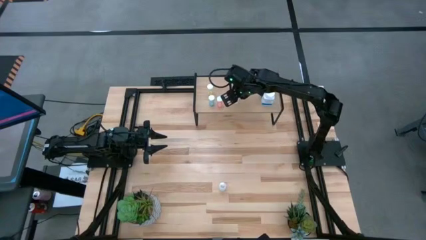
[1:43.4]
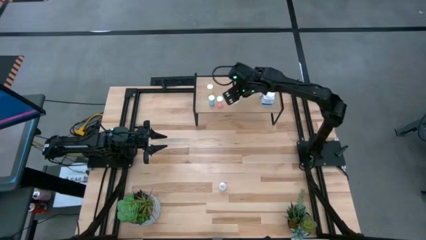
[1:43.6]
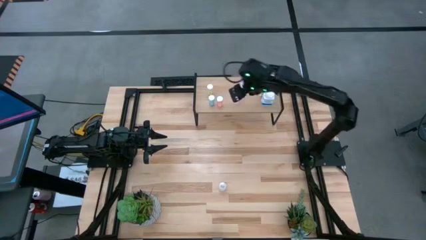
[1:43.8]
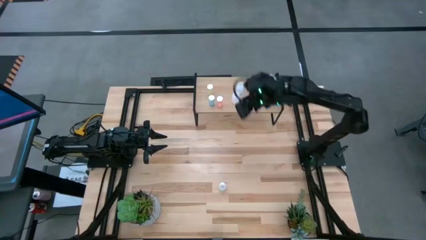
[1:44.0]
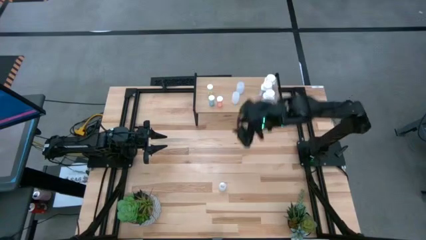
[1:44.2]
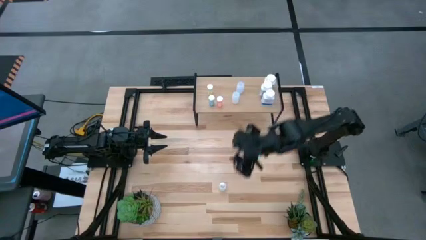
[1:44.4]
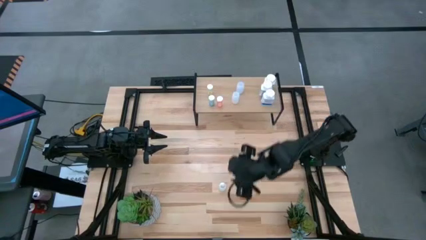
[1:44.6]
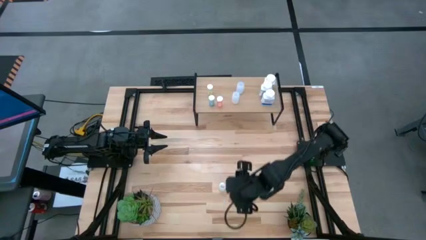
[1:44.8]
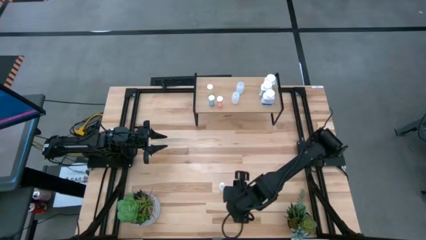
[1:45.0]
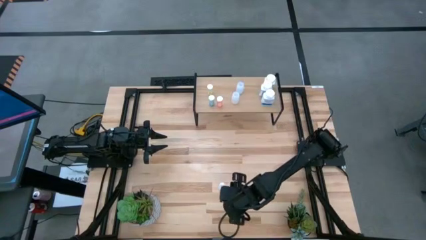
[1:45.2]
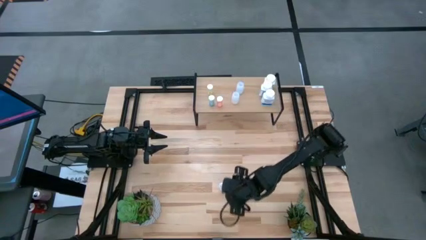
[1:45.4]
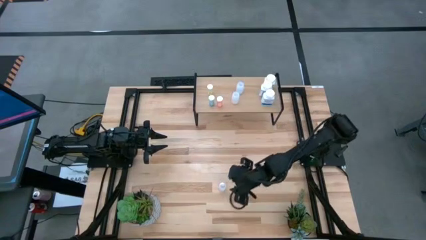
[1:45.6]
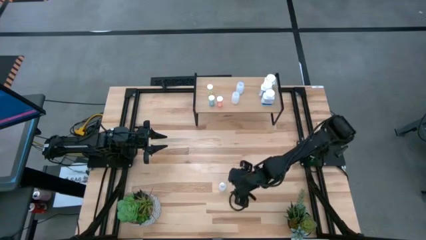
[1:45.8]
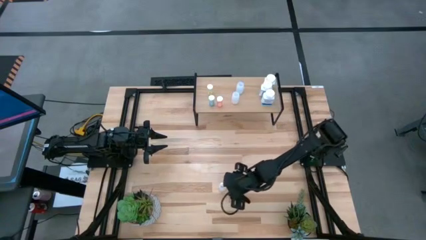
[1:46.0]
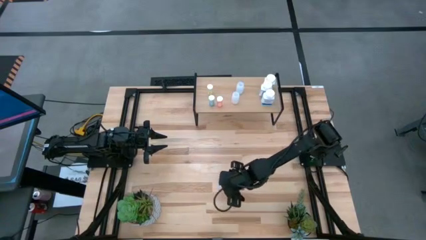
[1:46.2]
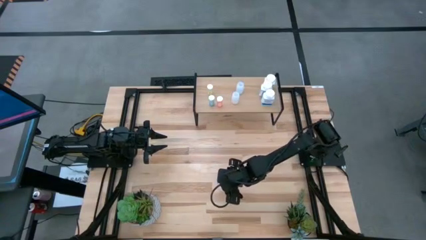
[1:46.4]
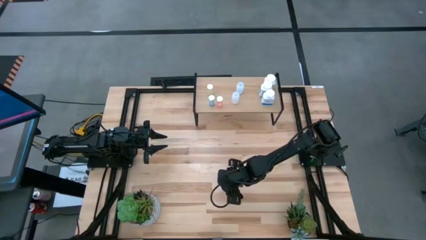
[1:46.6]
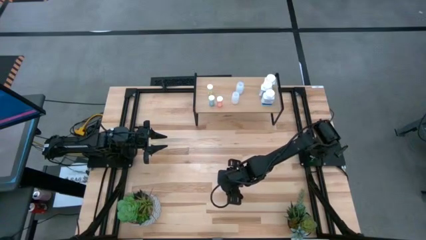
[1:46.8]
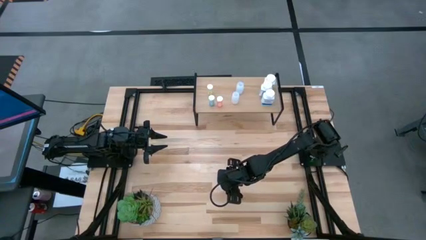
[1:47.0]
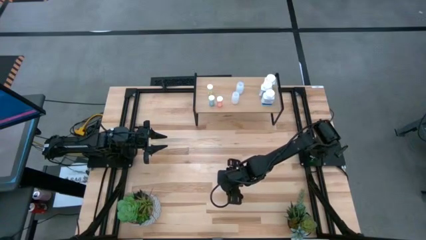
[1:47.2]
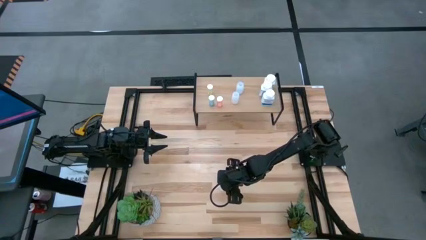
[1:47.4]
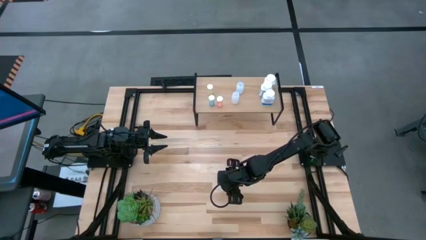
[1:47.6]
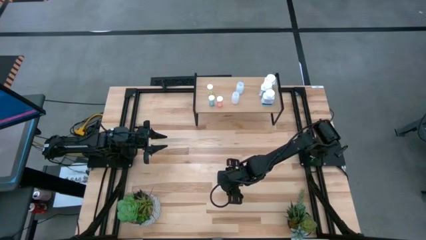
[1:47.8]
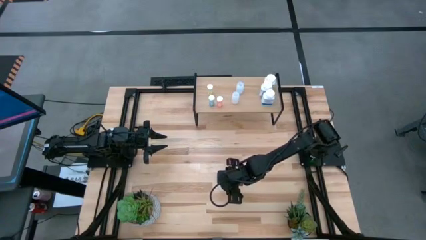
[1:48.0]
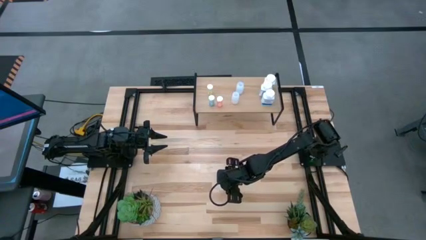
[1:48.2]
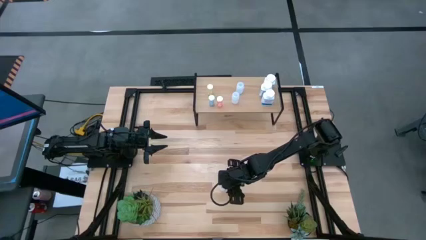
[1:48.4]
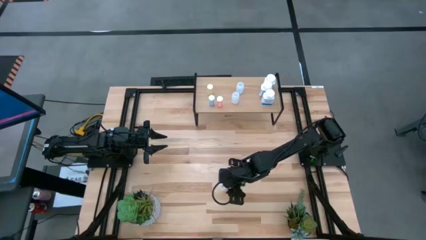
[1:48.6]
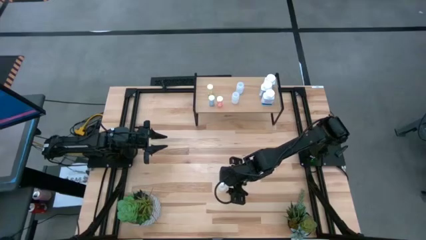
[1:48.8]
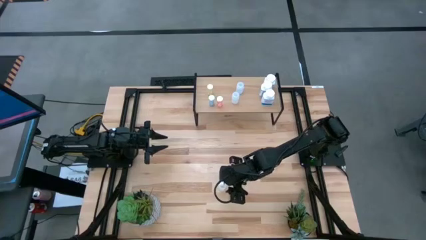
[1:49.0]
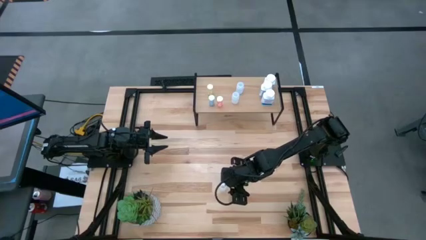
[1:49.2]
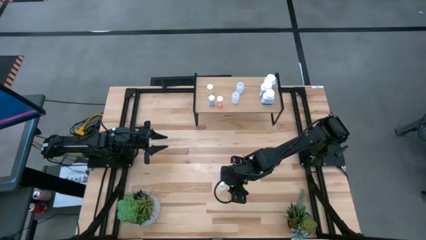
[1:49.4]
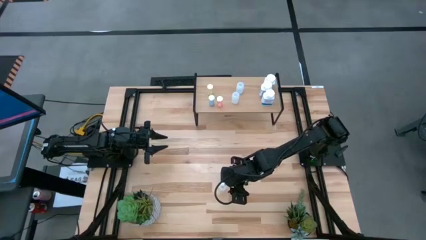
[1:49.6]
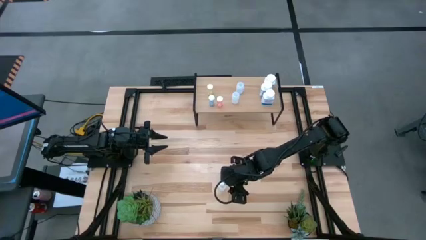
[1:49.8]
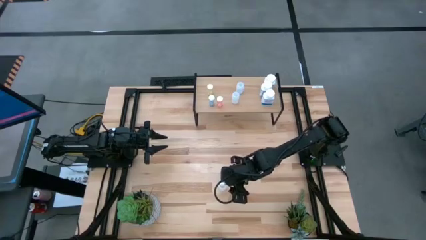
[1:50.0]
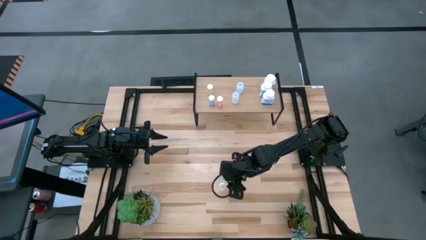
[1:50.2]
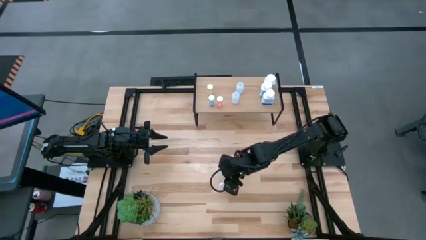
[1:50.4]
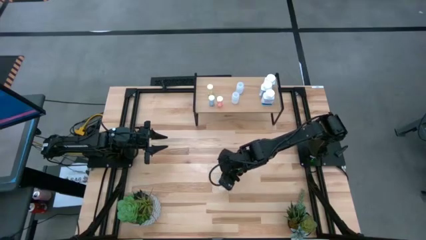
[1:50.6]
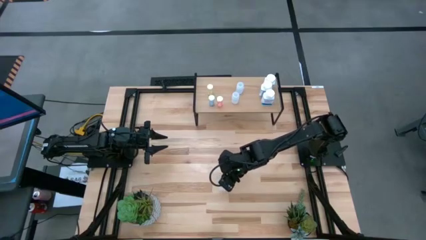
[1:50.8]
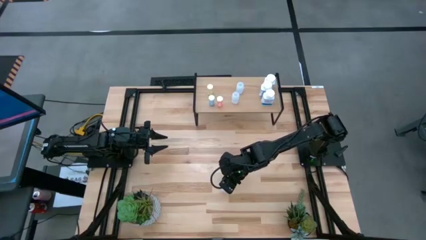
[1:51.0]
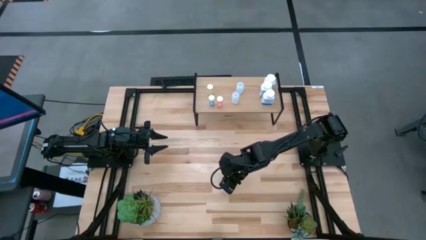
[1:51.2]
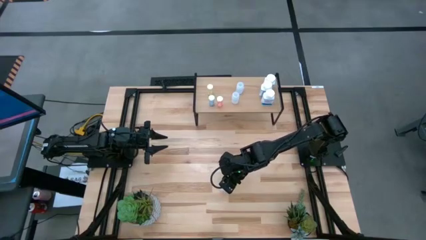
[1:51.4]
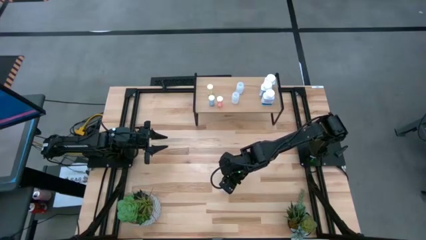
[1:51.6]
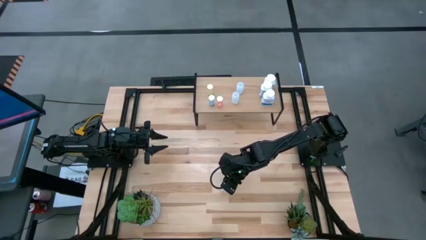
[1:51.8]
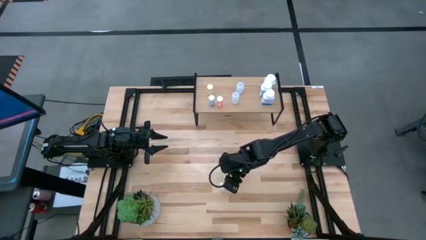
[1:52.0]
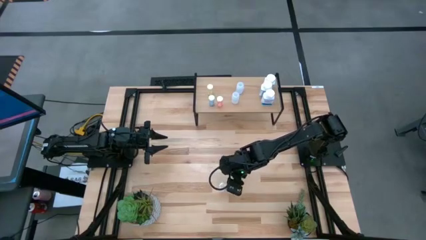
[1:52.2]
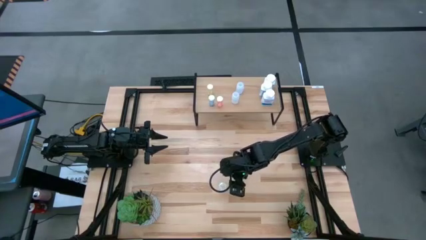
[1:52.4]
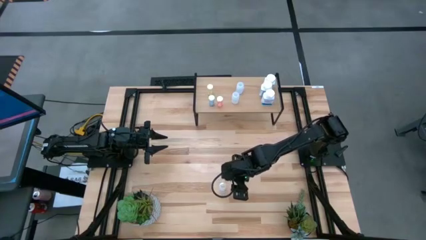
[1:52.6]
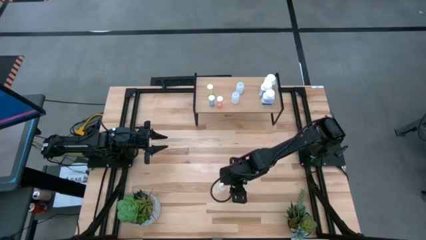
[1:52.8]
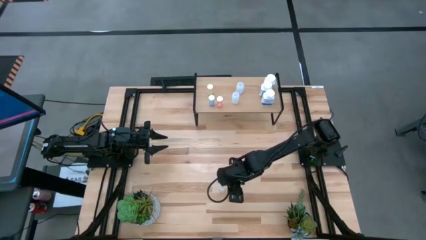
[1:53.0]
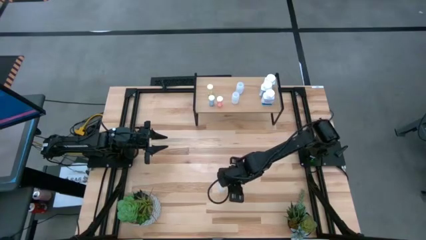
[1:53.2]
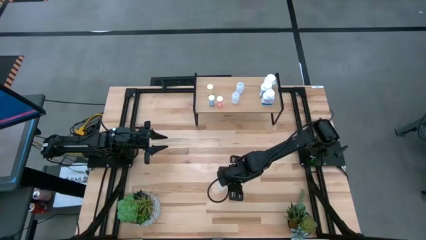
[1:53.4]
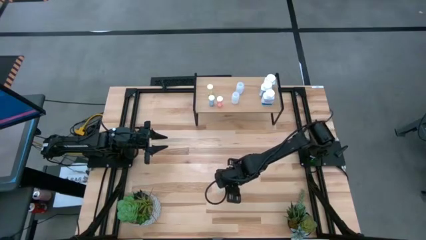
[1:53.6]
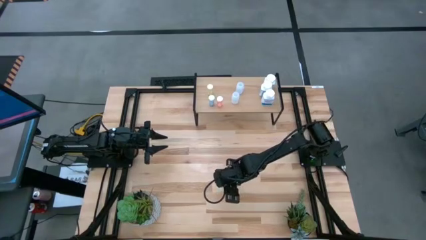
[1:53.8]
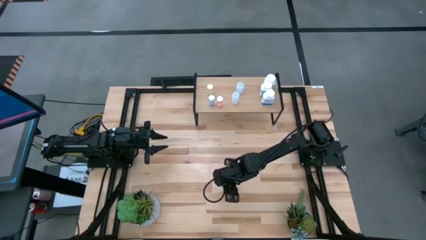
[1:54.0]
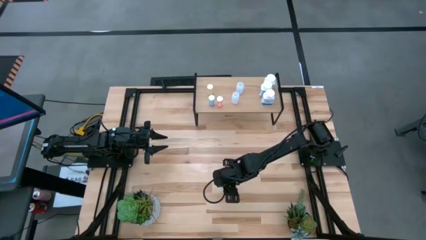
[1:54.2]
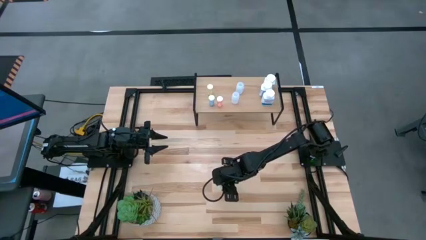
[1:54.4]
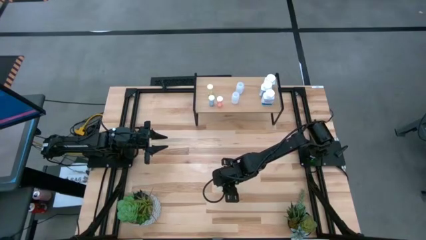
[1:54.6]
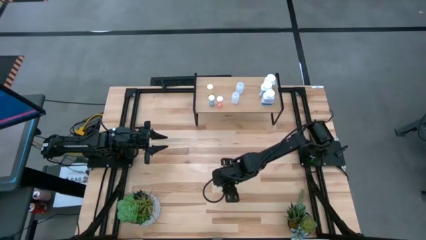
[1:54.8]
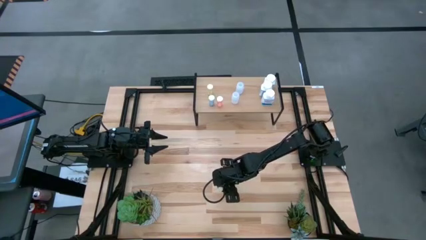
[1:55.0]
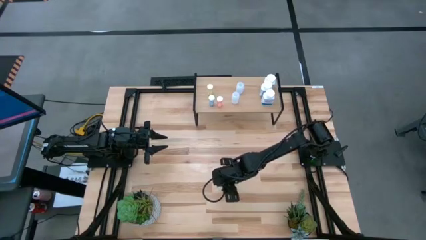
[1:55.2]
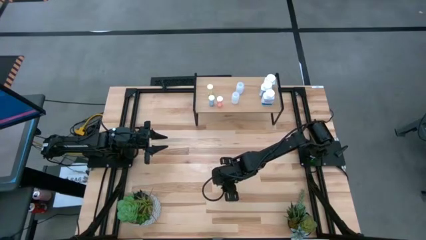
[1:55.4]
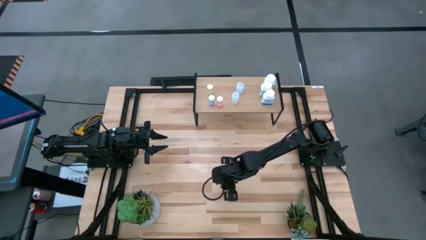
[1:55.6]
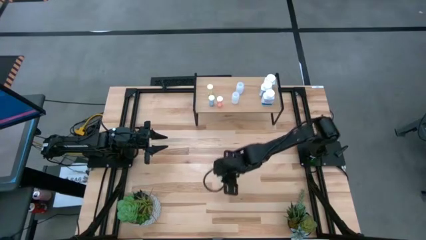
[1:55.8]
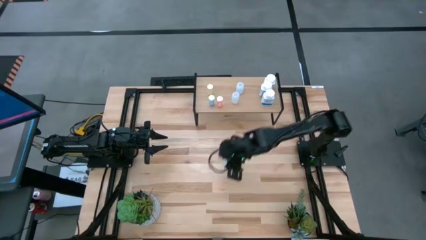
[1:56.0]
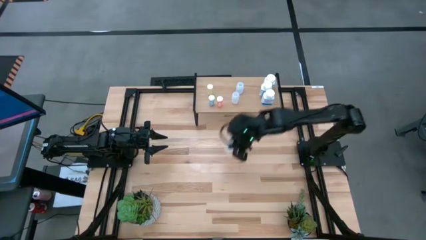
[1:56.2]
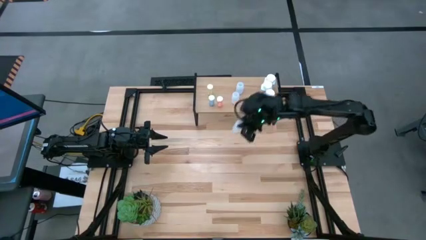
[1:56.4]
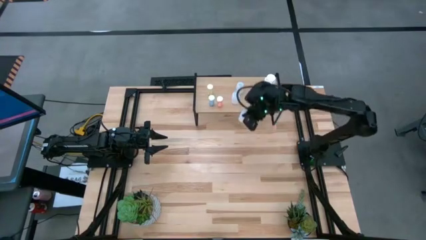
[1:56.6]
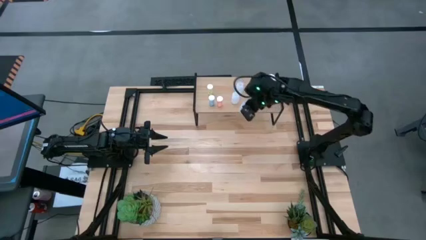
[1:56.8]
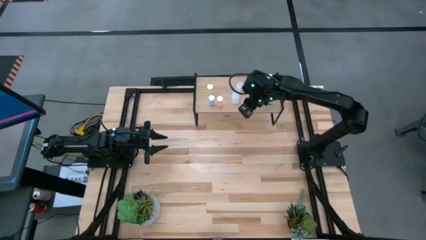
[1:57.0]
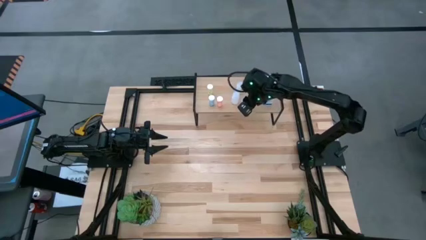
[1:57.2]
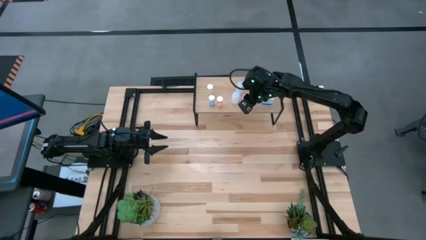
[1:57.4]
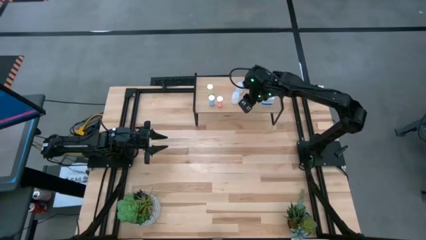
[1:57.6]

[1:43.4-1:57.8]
Task: Pick and place medicine bottles onto shelf by color
Put the transparent pill bottle on the shelf
